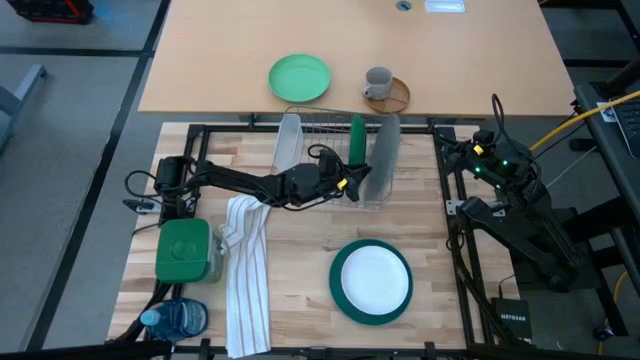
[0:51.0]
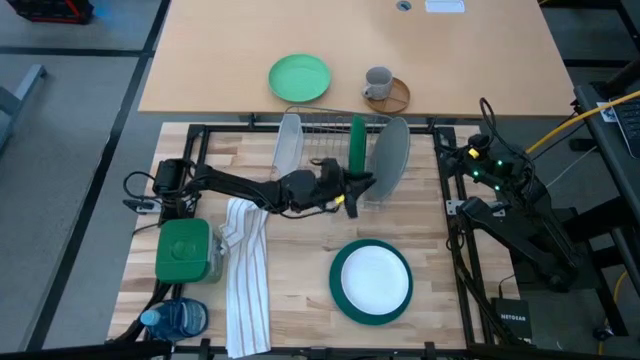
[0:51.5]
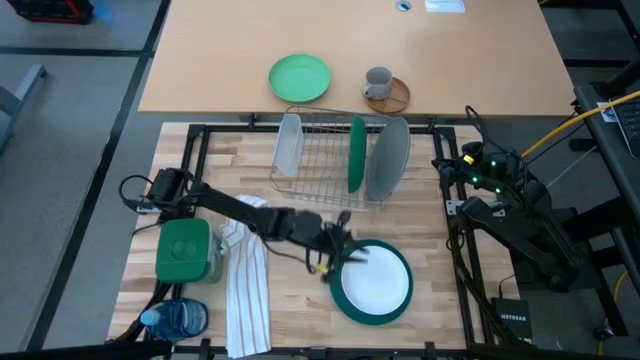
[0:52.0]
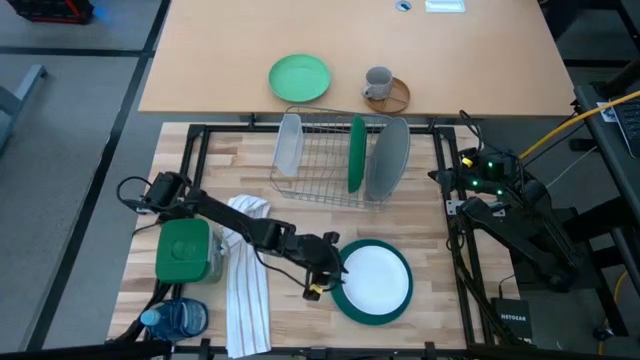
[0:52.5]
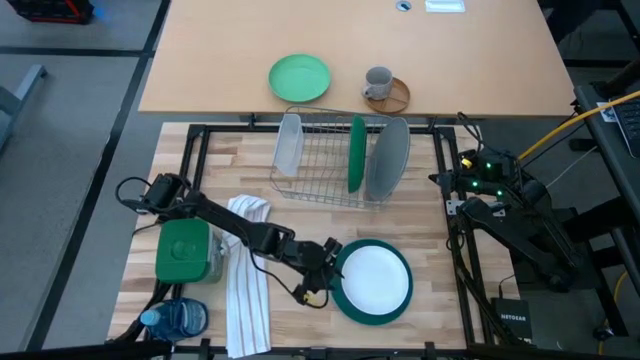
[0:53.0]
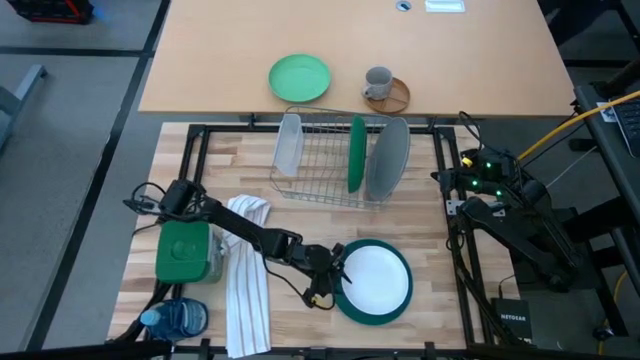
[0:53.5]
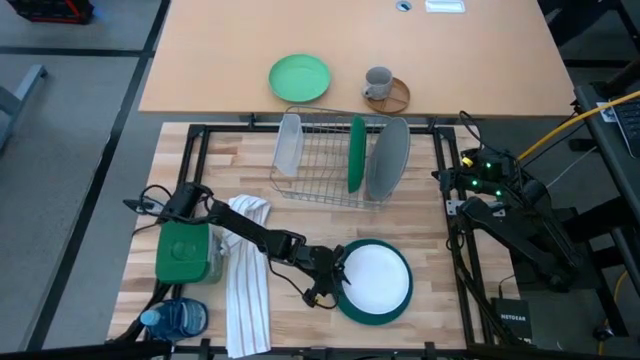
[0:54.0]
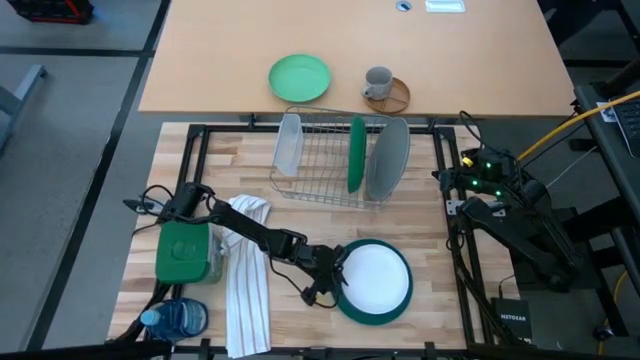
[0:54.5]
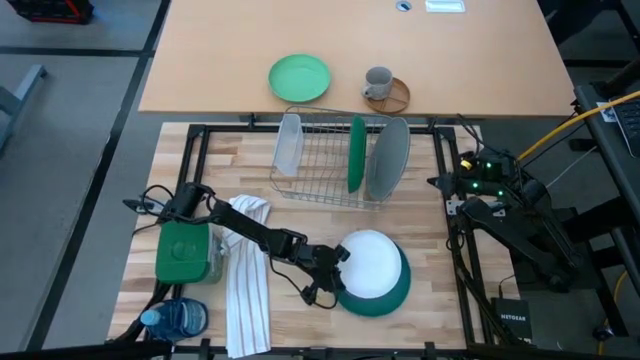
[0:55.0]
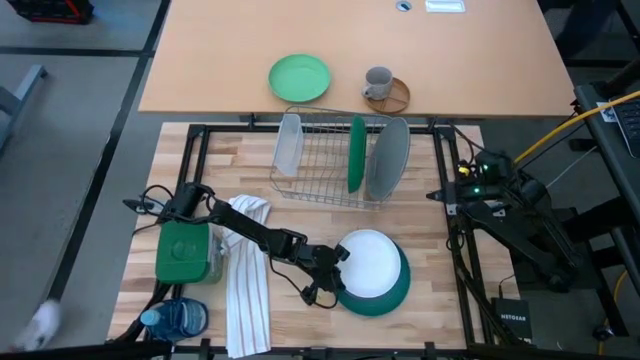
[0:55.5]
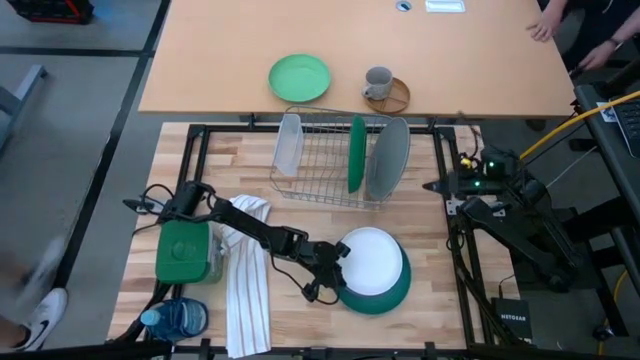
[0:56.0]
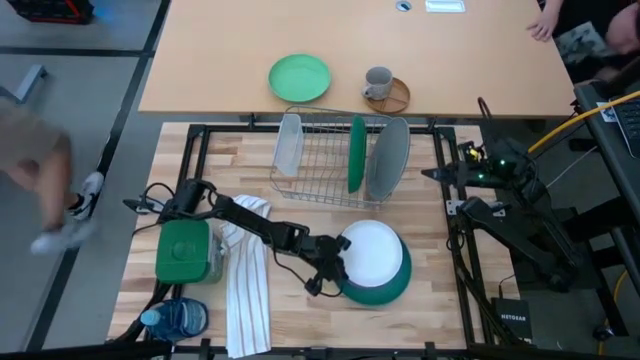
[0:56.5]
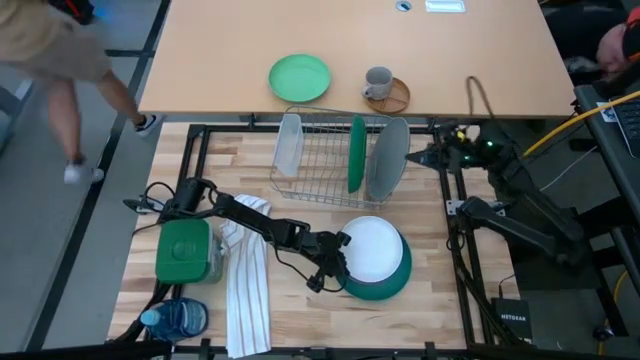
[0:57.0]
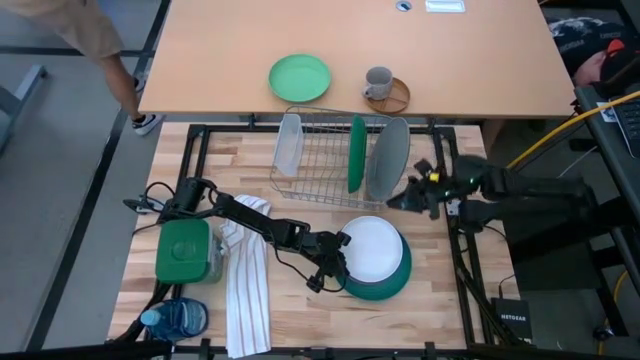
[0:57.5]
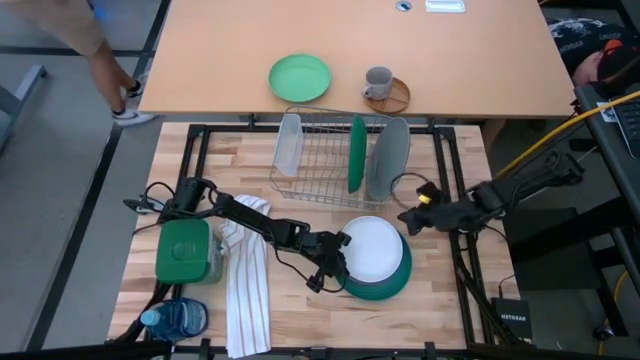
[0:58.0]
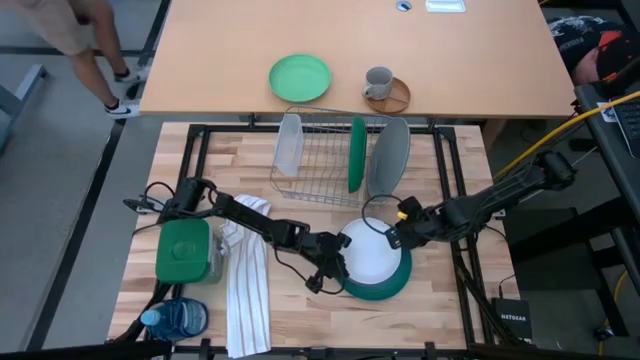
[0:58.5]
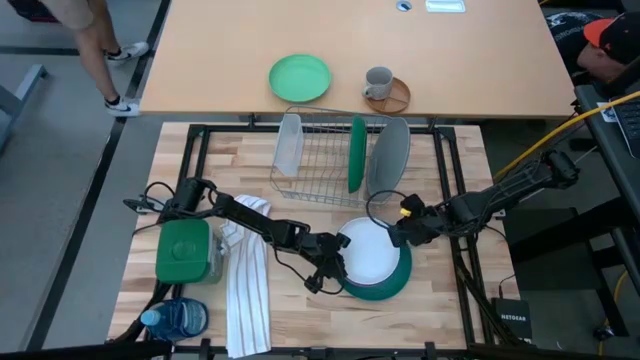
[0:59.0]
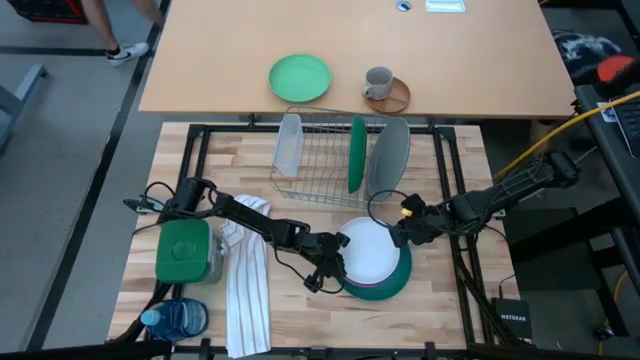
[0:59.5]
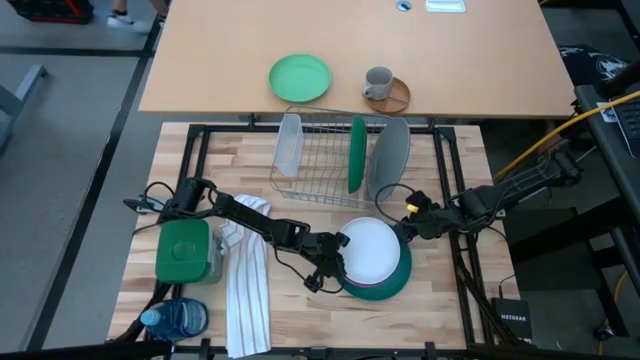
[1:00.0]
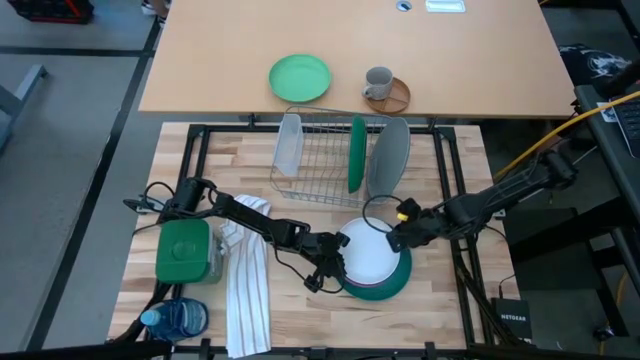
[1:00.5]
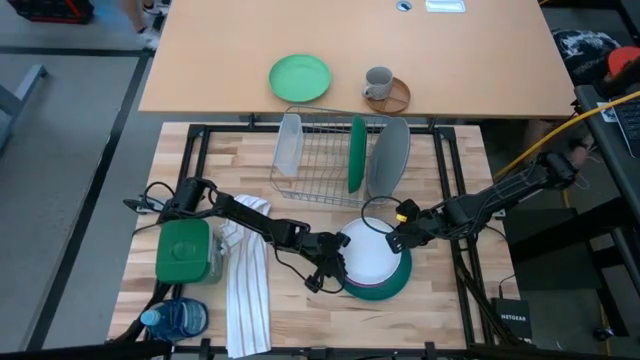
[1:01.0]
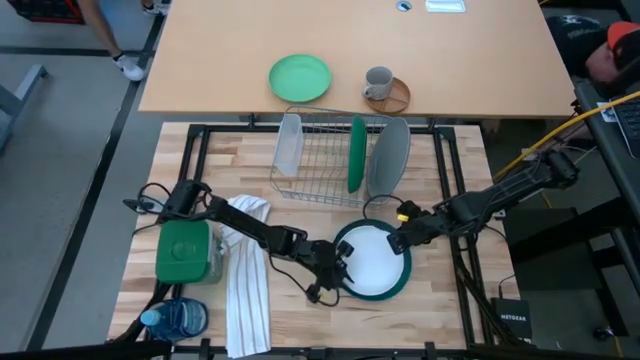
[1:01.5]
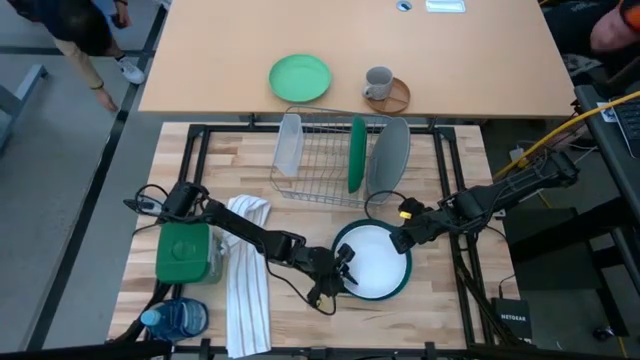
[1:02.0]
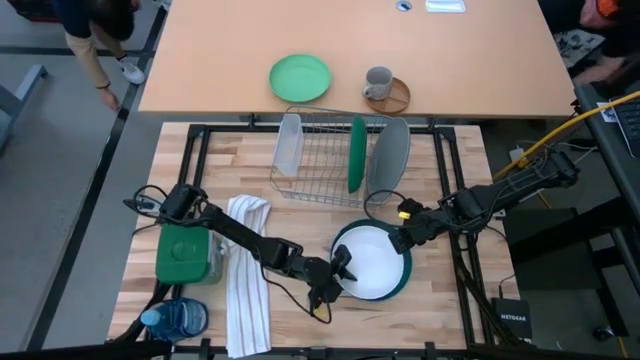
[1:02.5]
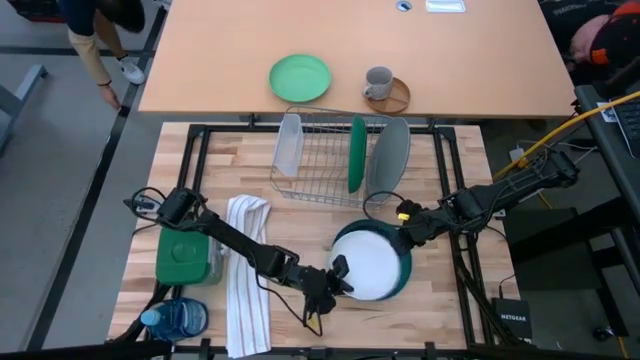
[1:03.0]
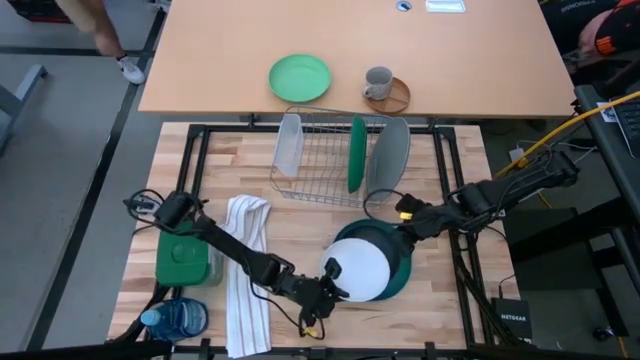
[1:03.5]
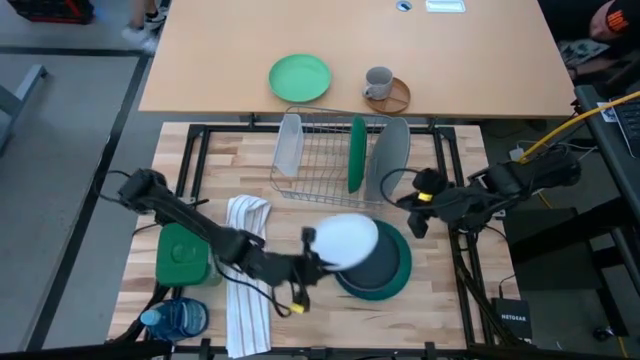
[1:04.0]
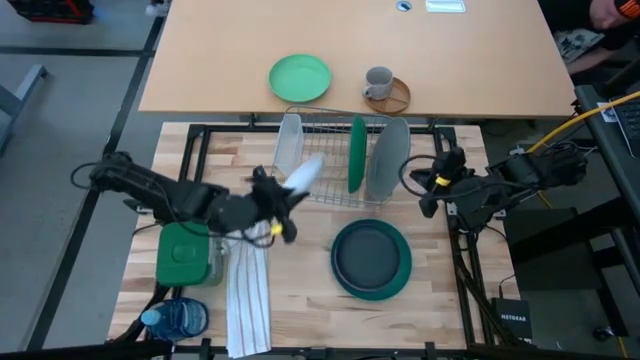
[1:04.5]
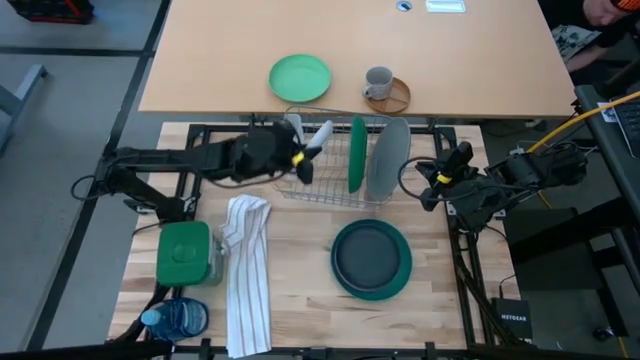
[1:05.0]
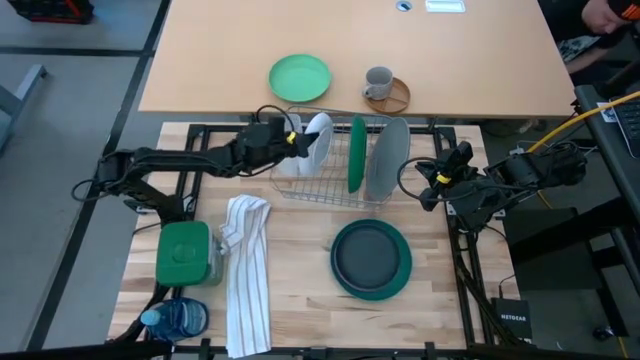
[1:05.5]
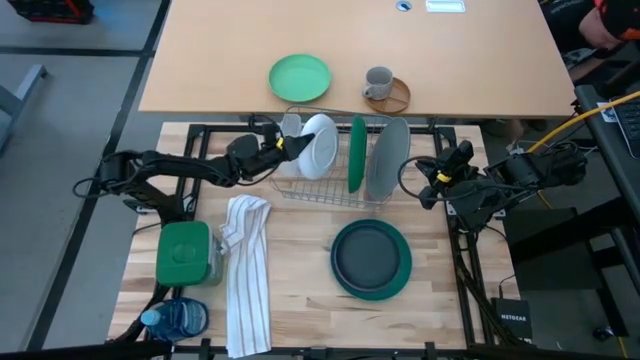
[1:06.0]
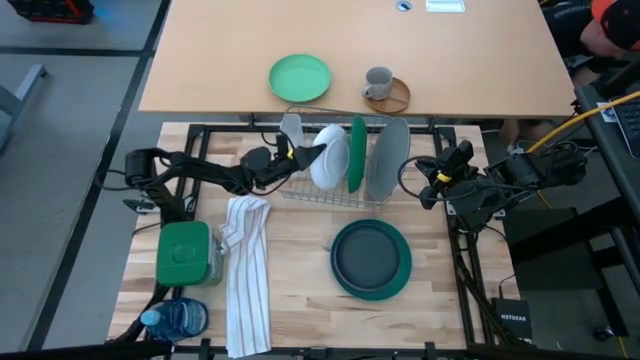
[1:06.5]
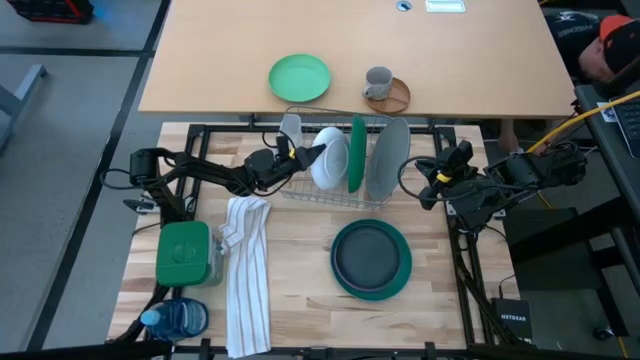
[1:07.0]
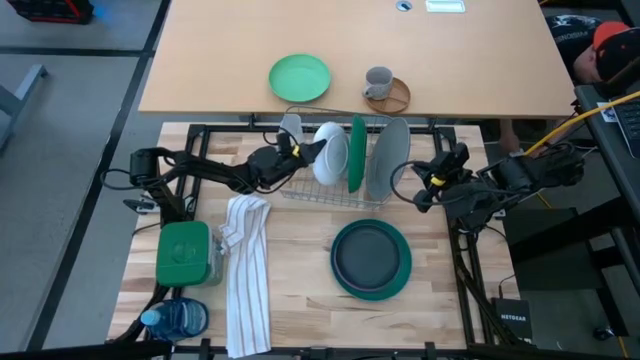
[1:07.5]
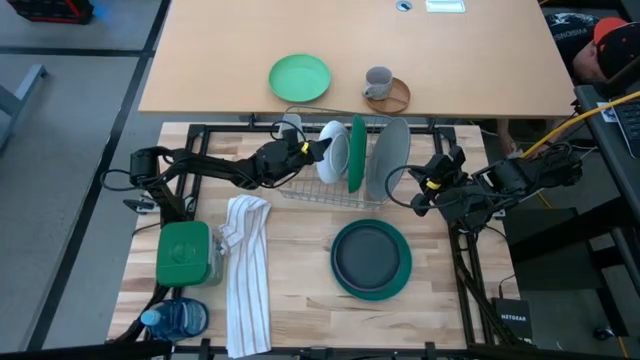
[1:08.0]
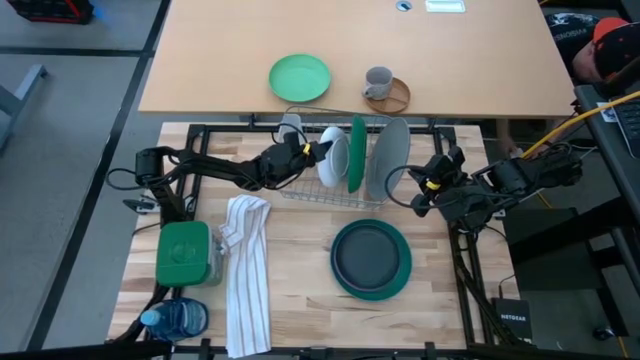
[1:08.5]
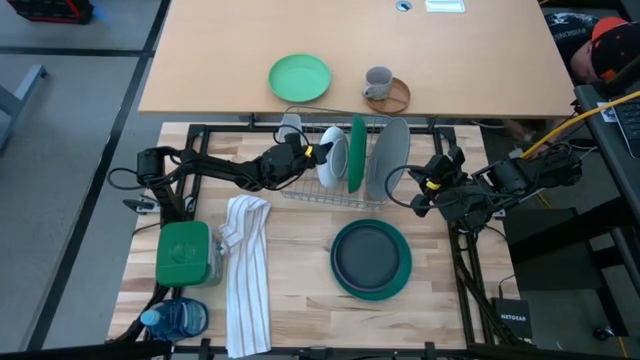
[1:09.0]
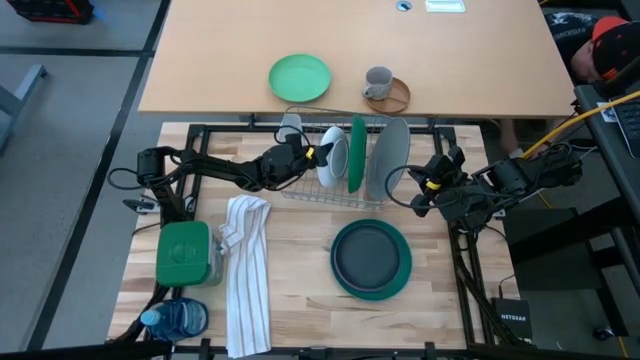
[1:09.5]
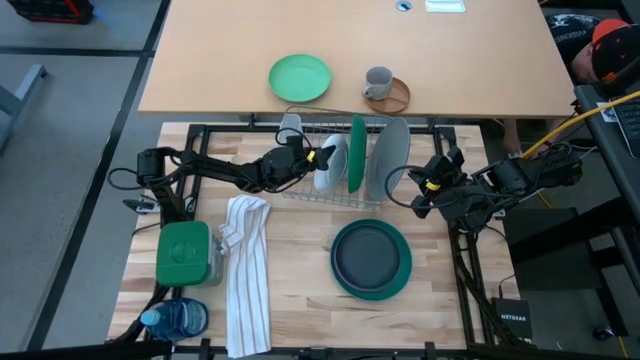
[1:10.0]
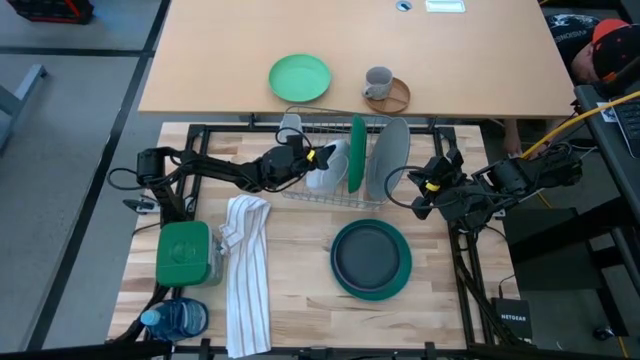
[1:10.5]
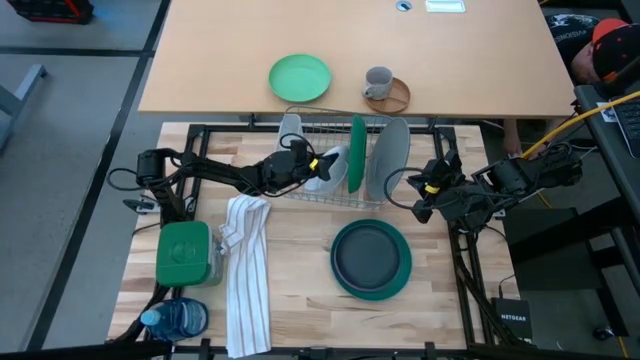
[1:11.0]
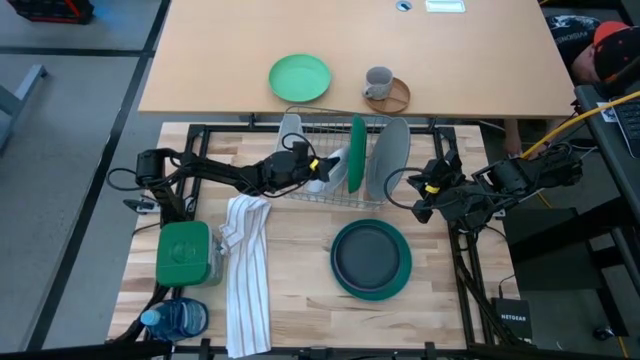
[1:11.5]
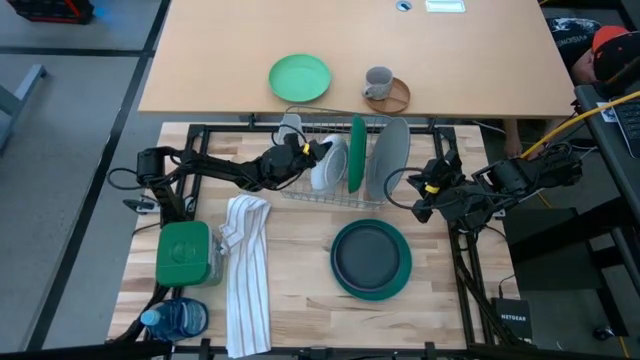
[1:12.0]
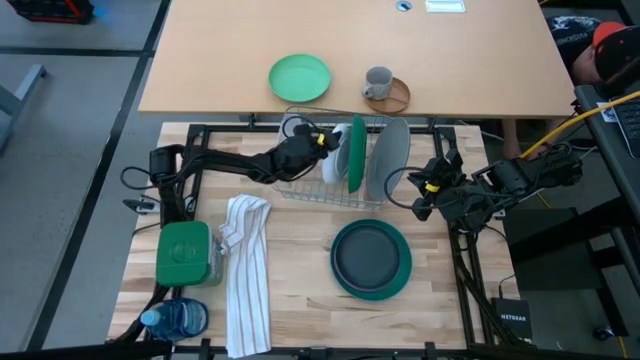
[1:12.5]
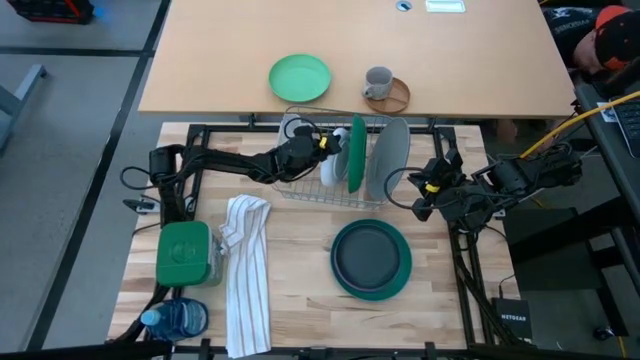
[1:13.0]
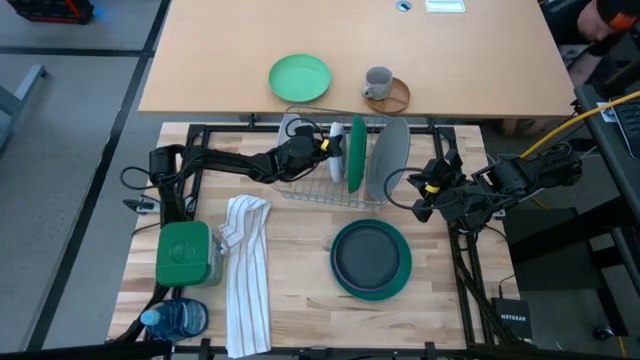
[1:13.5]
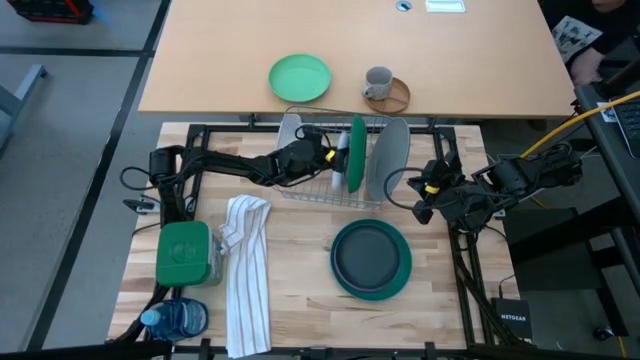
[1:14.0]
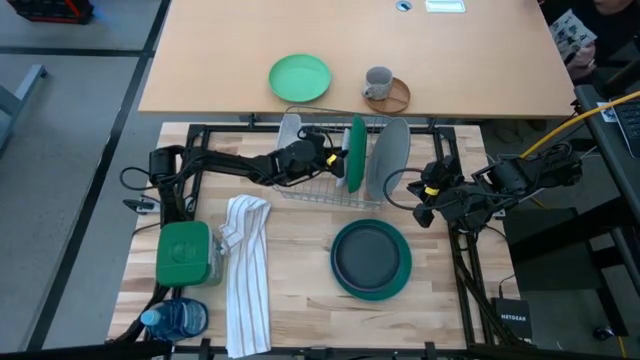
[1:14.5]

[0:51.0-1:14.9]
Task: Sort dishes
Put the white plate in the dish rack
